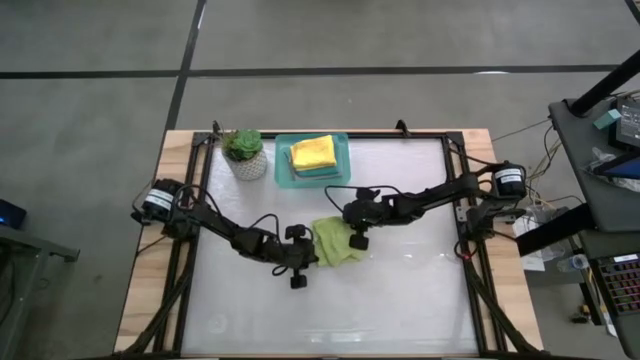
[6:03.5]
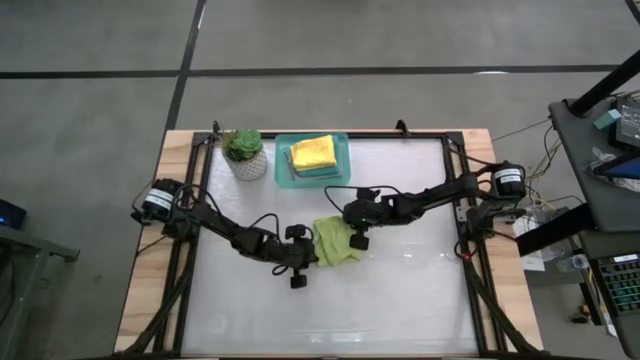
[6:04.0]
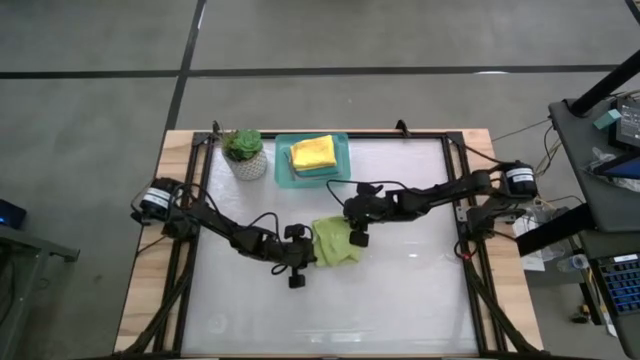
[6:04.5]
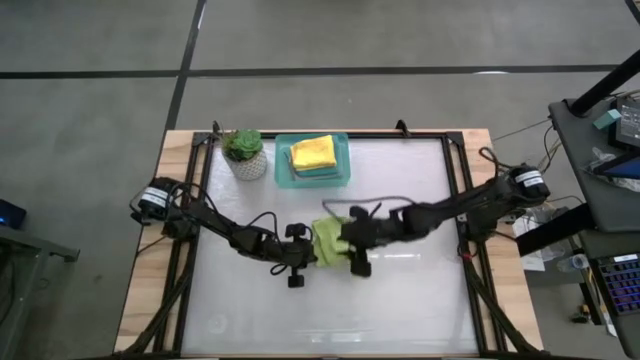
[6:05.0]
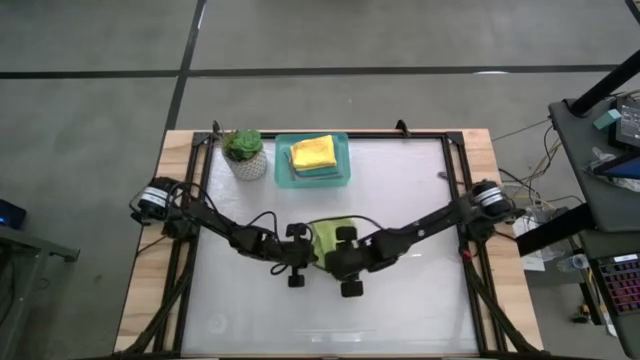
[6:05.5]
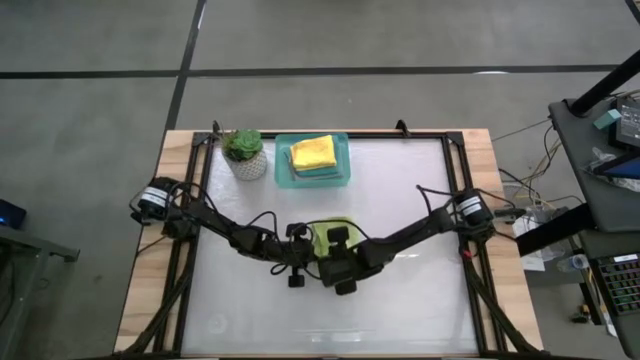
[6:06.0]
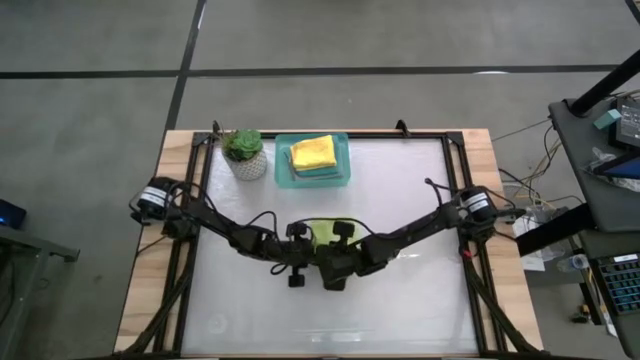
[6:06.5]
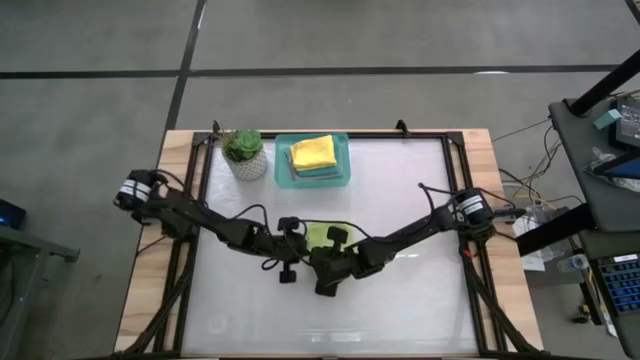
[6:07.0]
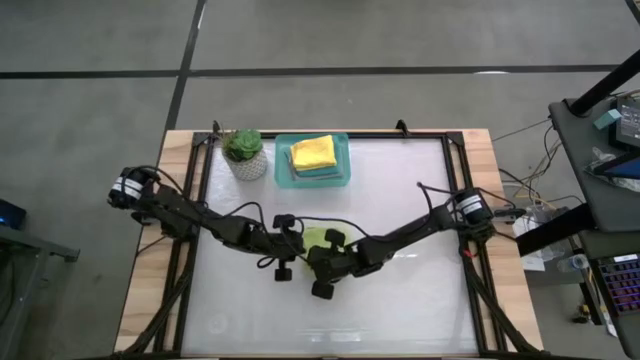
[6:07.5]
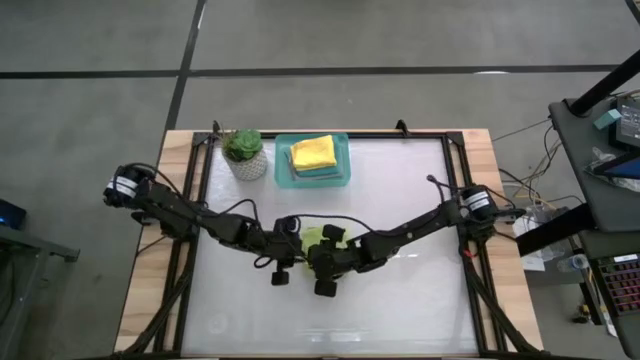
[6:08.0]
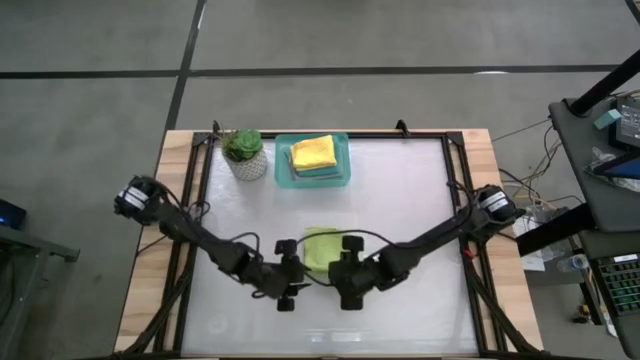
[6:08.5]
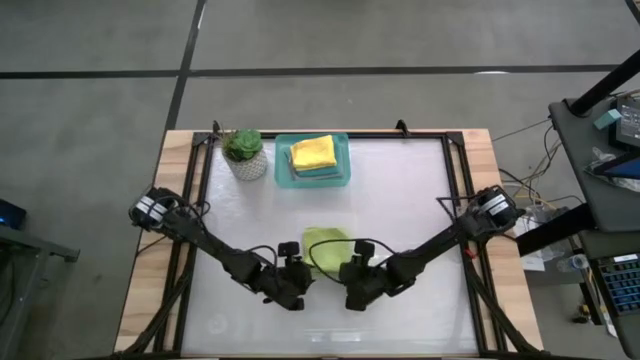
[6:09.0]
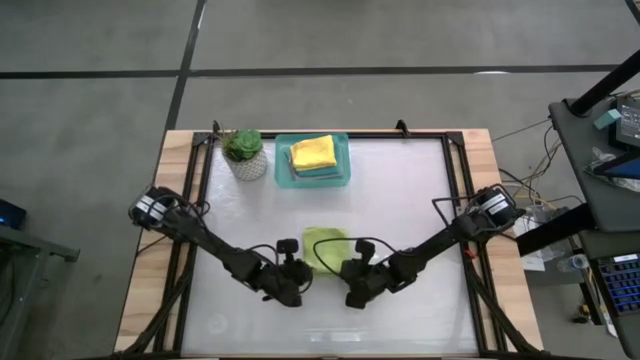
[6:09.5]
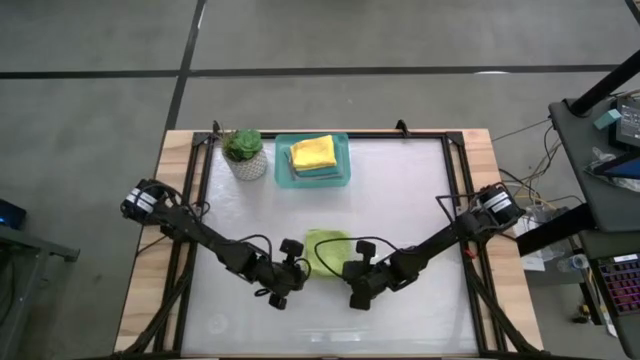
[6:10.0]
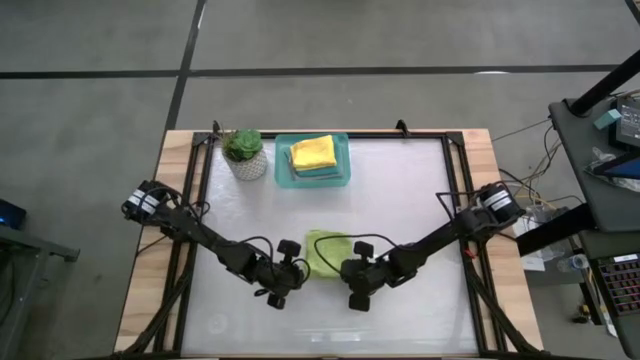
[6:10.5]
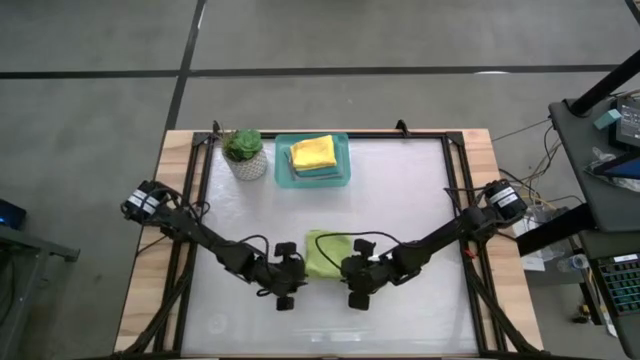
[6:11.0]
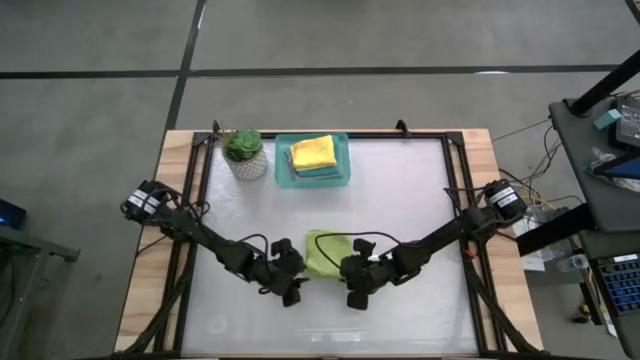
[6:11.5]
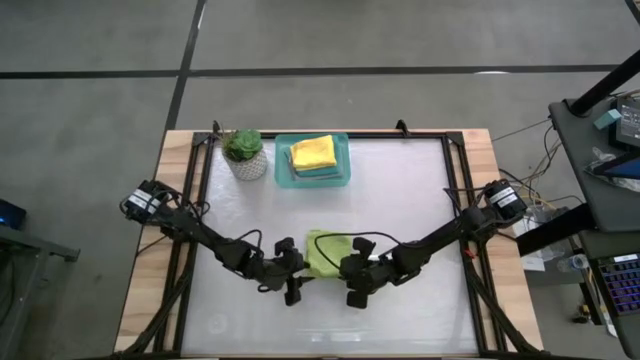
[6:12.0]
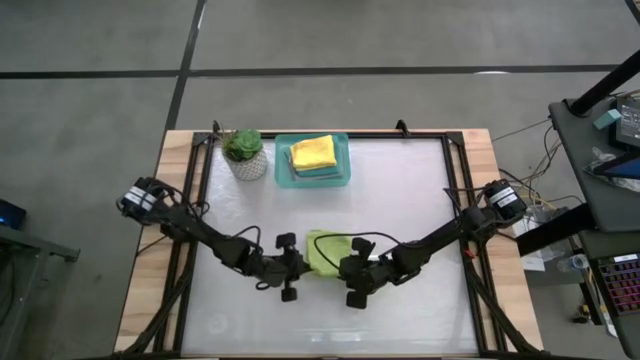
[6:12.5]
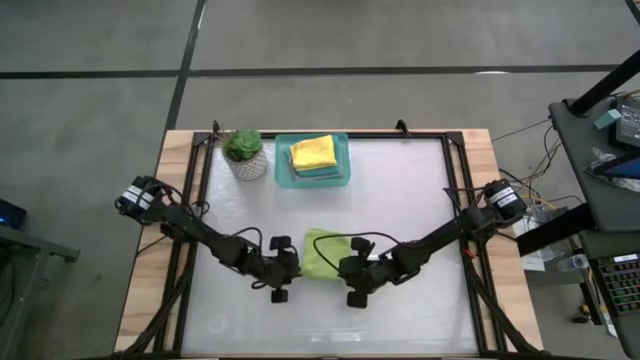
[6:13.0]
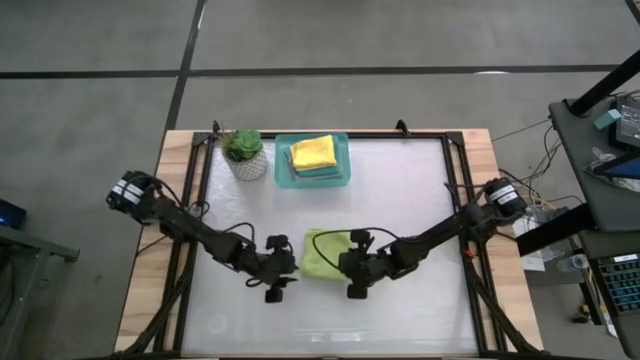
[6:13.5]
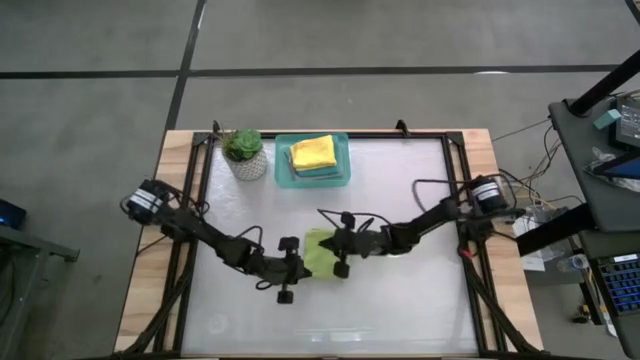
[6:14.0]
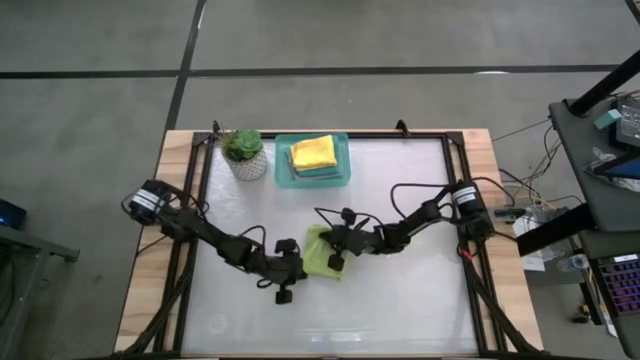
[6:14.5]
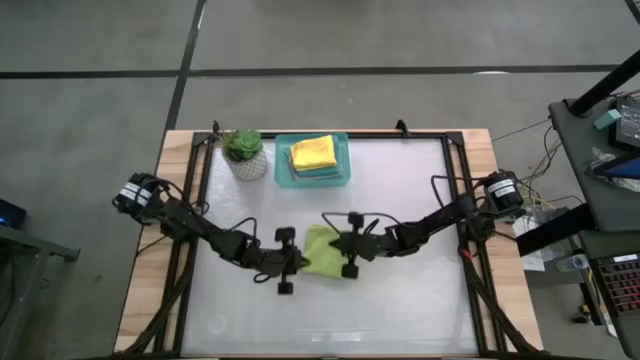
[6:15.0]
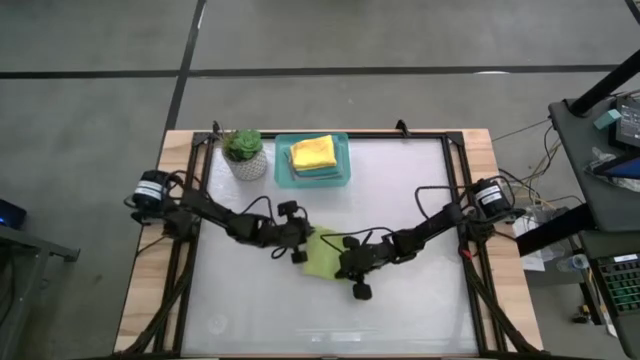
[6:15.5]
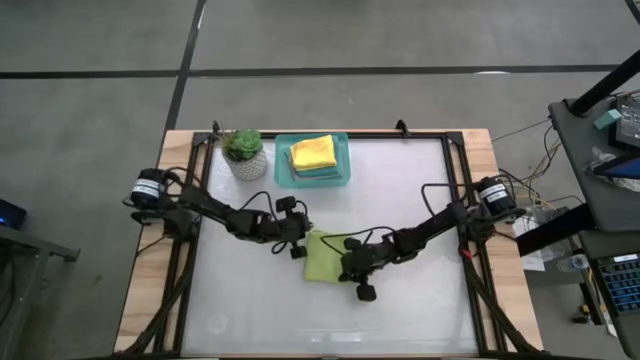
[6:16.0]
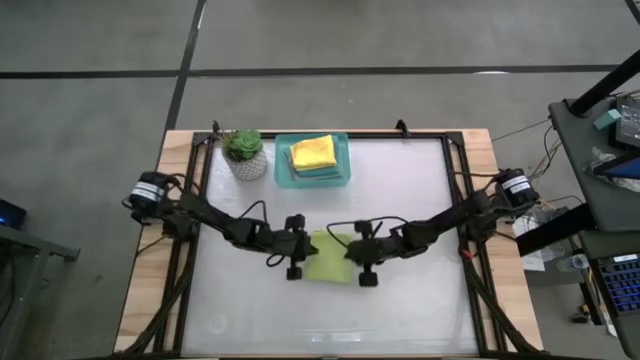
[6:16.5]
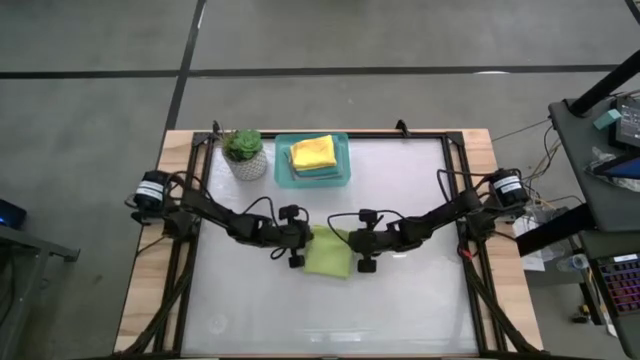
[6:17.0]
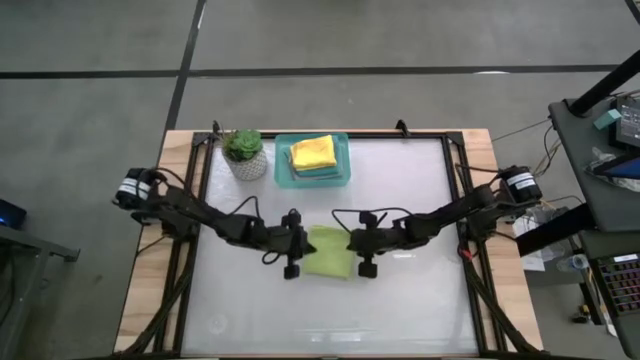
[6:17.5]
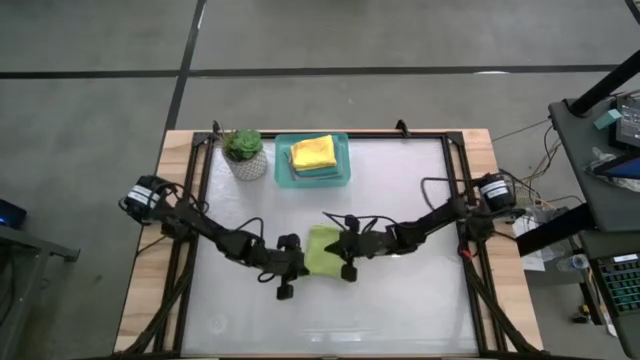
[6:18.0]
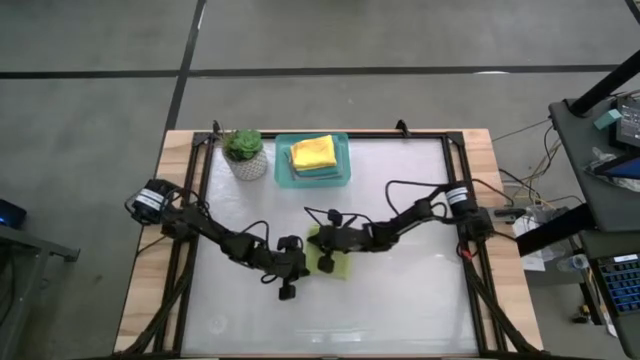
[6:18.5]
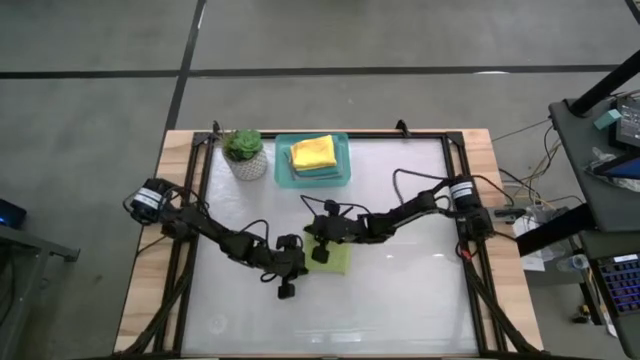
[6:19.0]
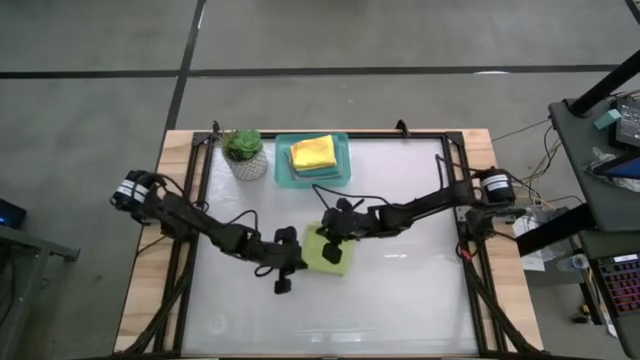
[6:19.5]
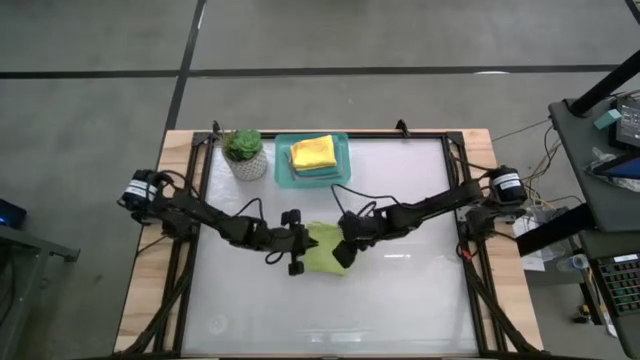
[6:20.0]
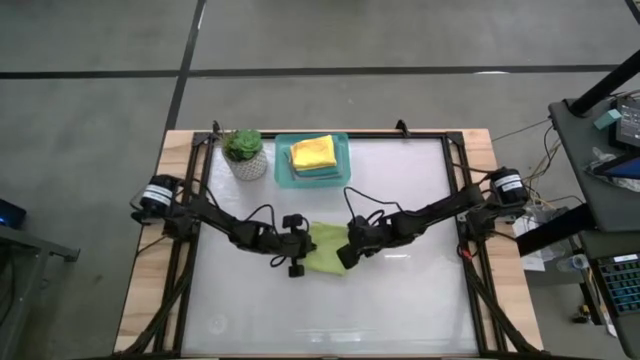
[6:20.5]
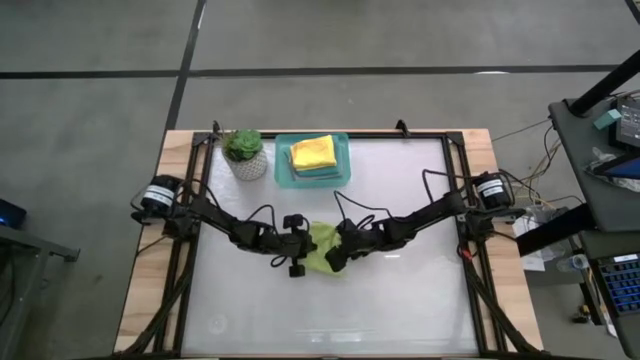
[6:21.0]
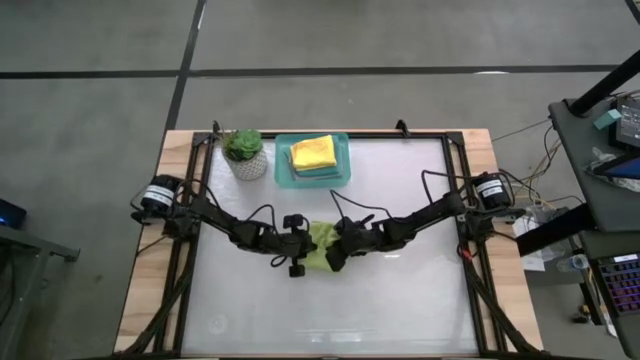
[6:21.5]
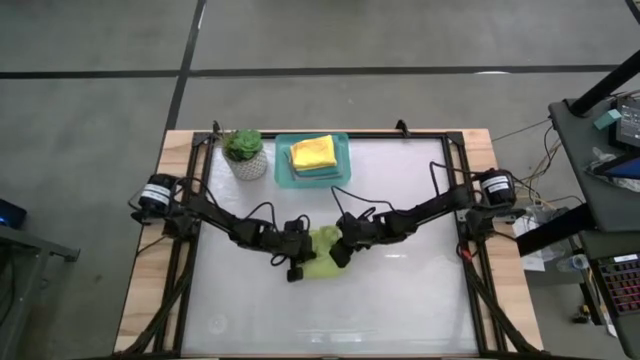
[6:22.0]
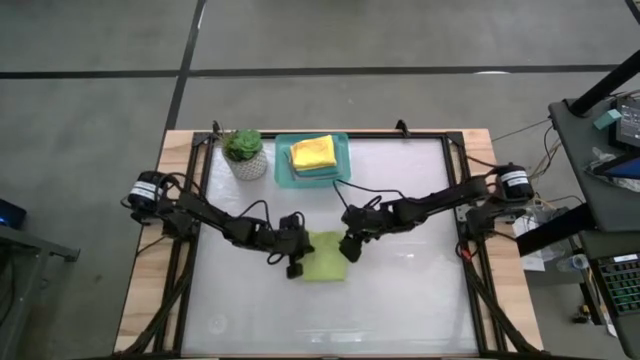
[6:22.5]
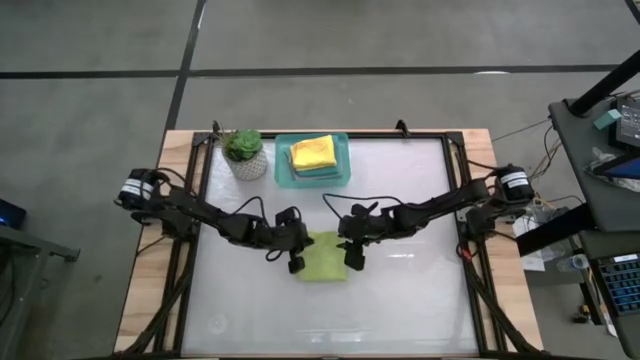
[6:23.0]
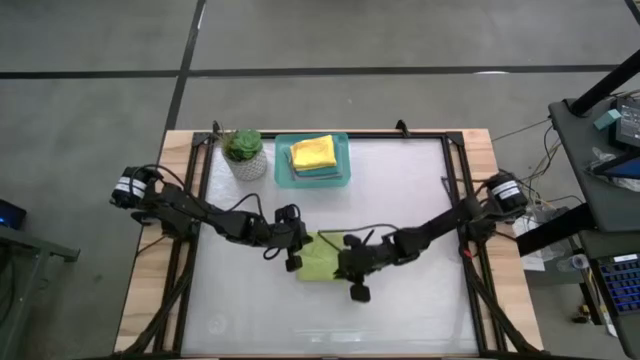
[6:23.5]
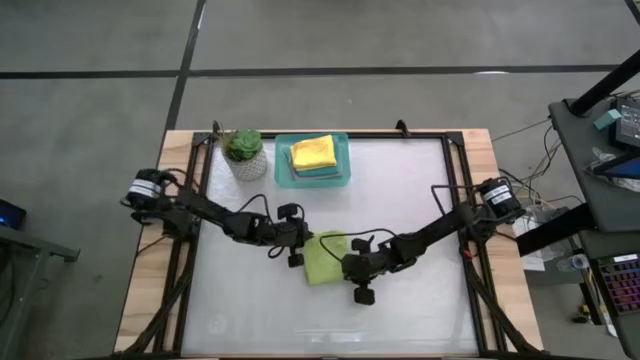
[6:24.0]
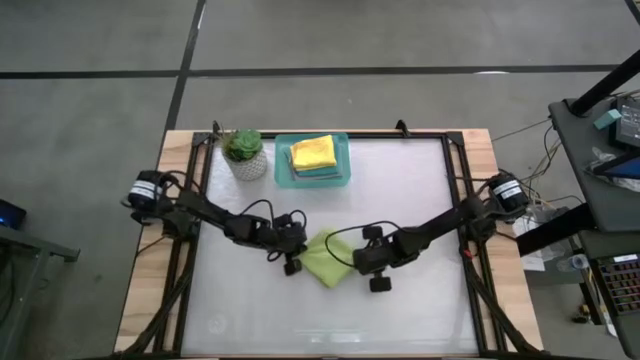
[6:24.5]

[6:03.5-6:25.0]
Task: Fold microfiber towels
Fold the green microfiber cloth
